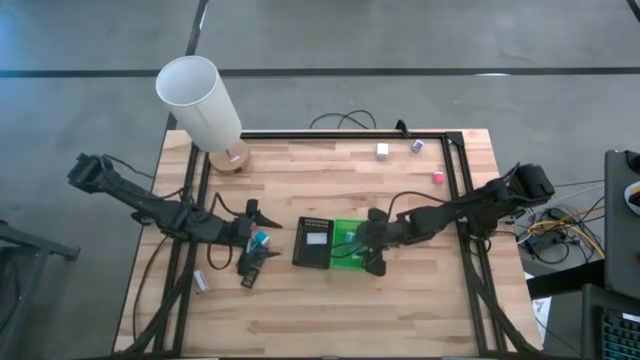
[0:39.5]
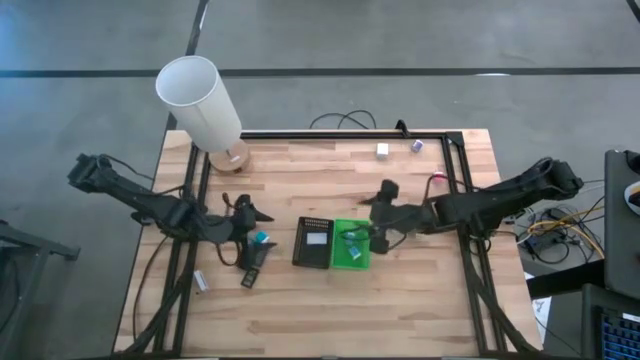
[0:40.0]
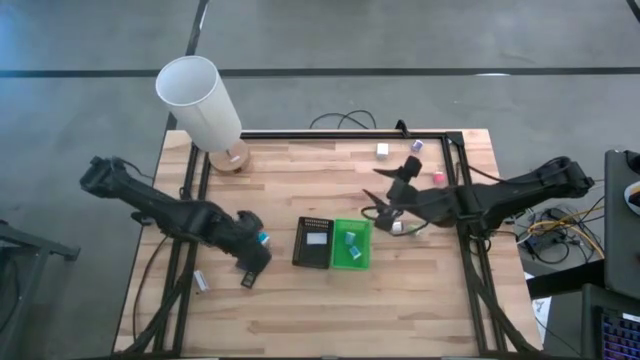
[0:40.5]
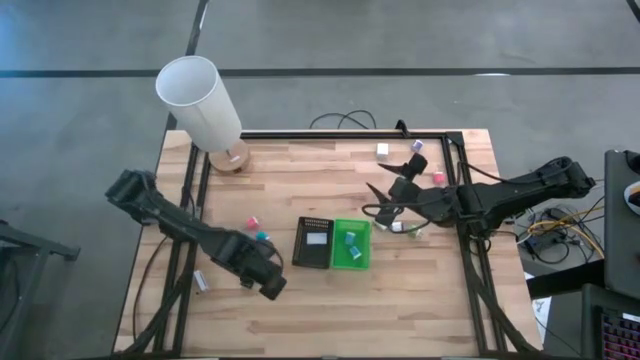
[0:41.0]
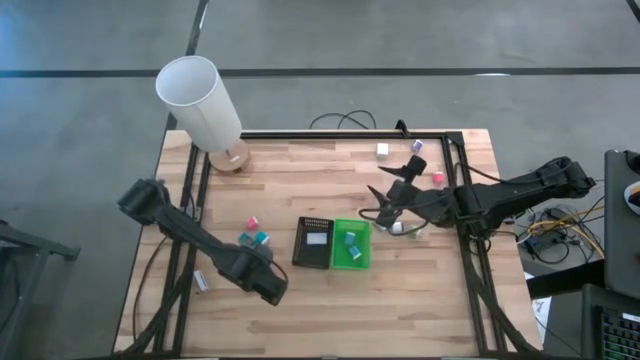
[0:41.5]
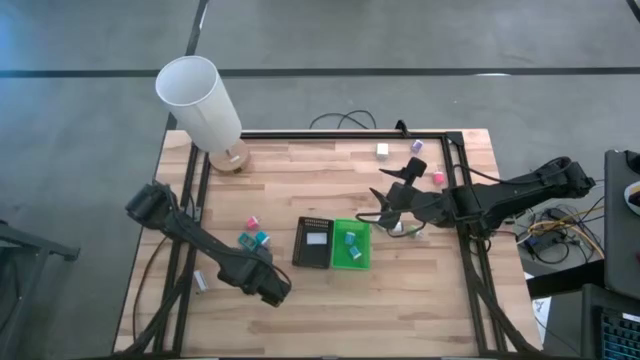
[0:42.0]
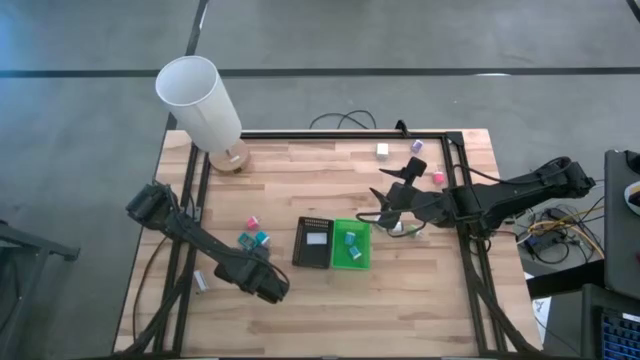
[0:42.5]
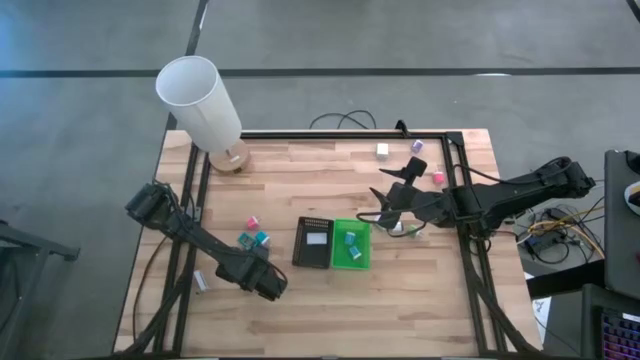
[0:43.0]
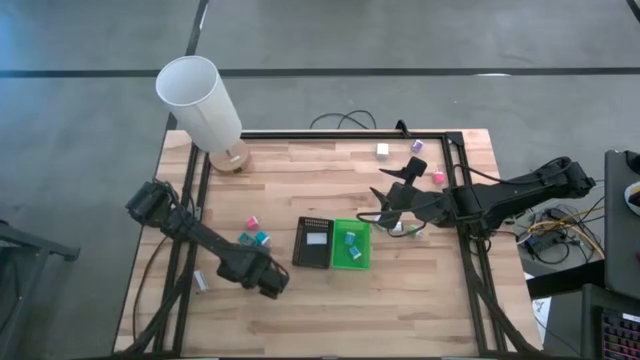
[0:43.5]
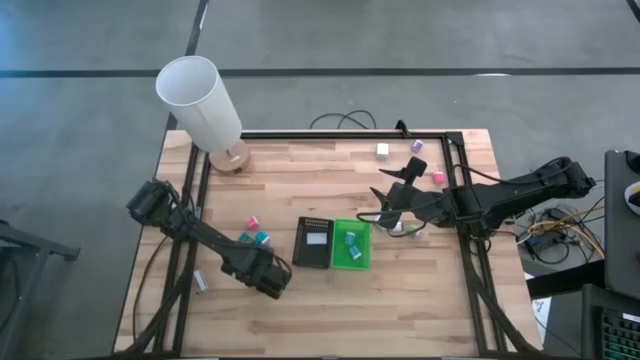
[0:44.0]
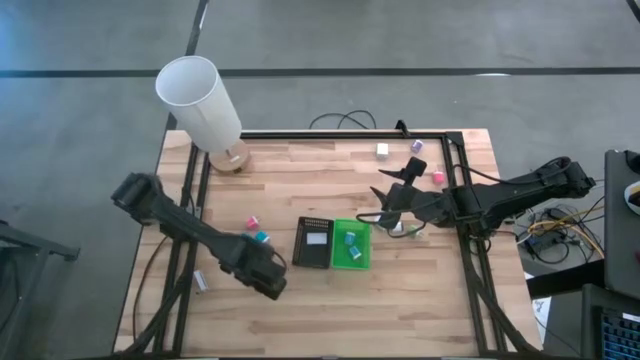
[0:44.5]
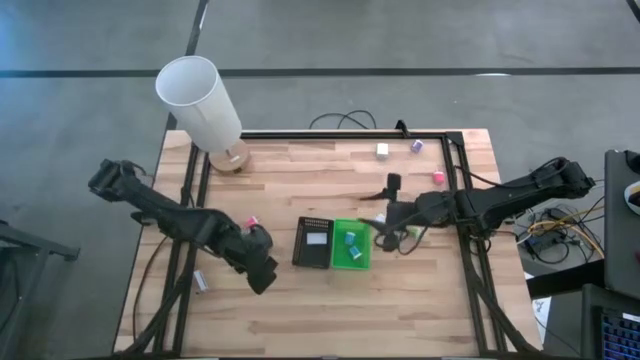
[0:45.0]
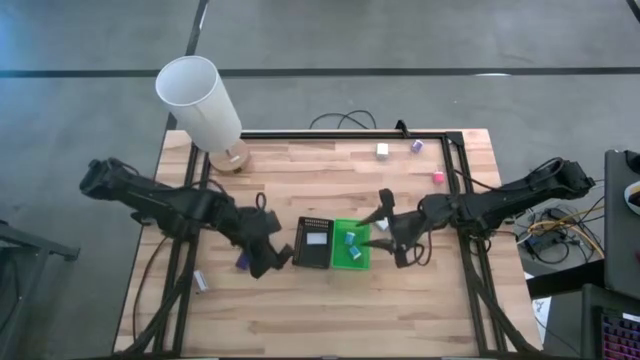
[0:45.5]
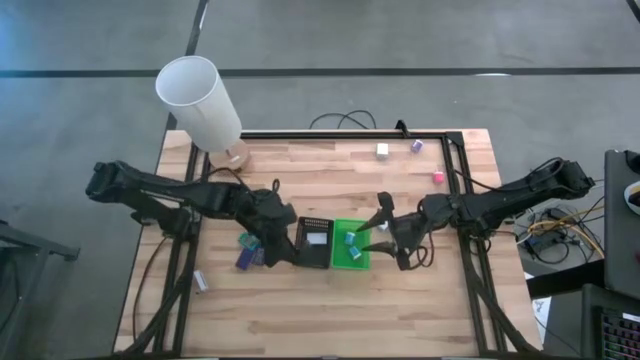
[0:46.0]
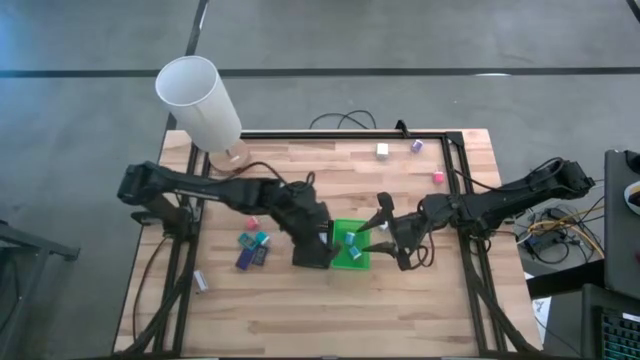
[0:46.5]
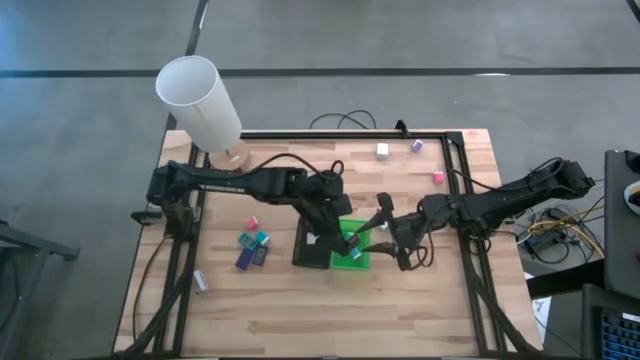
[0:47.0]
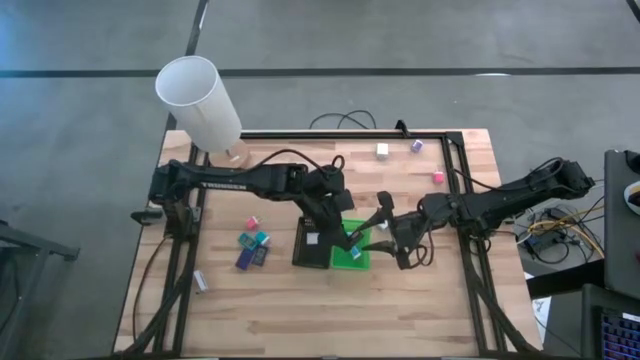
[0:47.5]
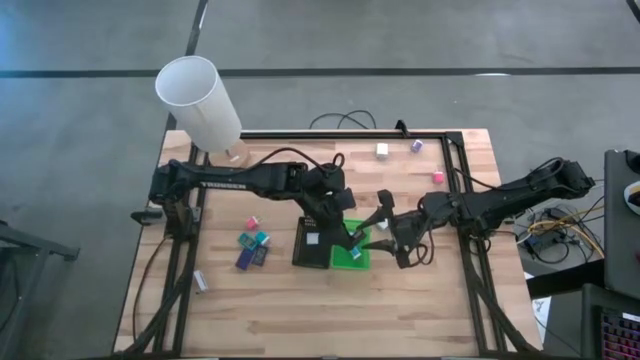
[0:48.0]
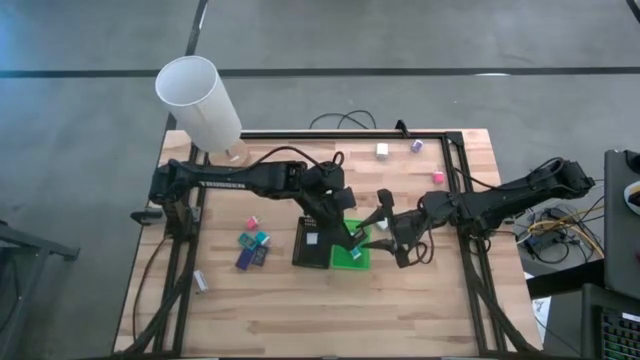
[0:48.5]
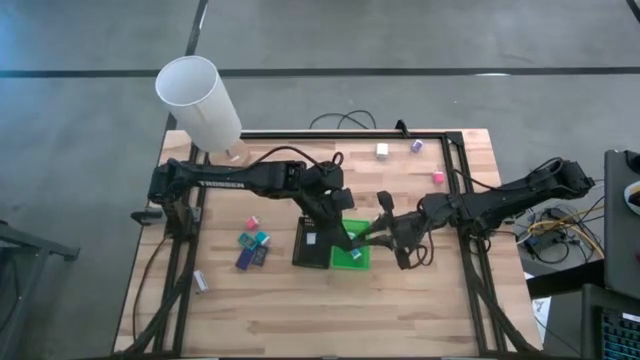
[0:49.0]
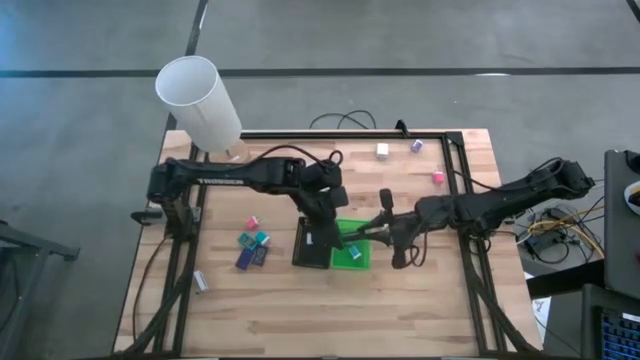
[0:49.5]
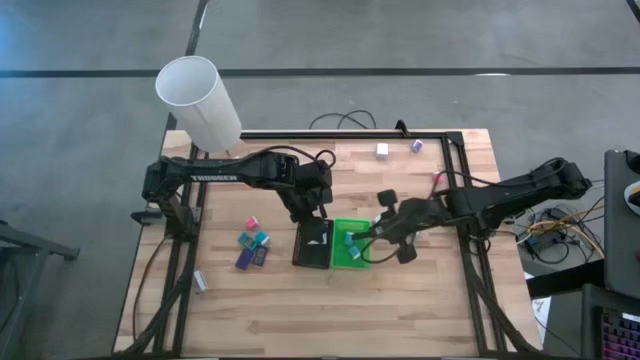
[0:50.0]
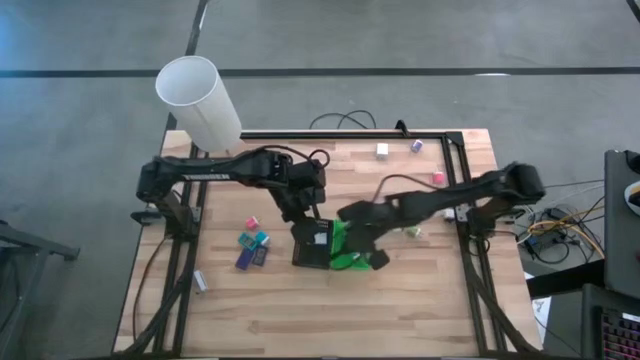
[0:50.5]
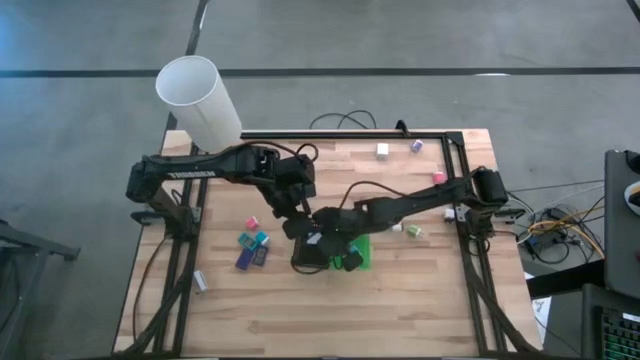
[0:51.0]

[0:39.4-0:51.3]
Task: Pick & Place Office items
Put the black digital clock into the black basket

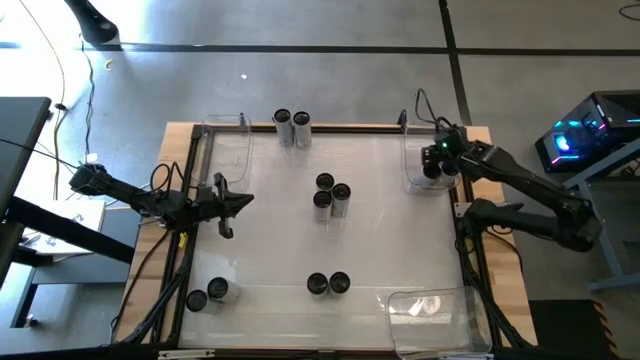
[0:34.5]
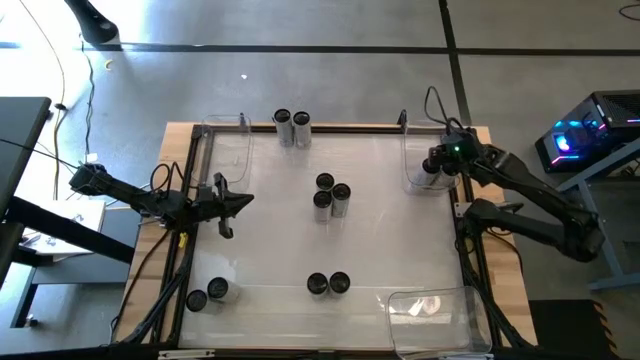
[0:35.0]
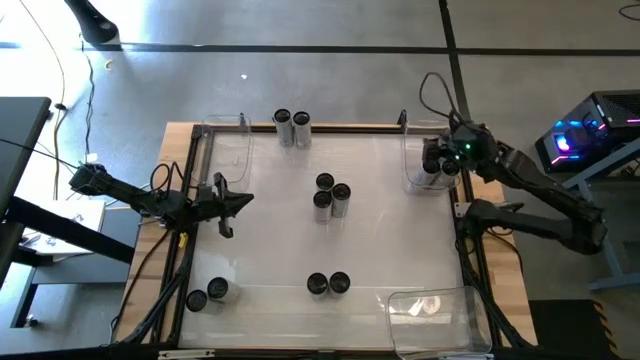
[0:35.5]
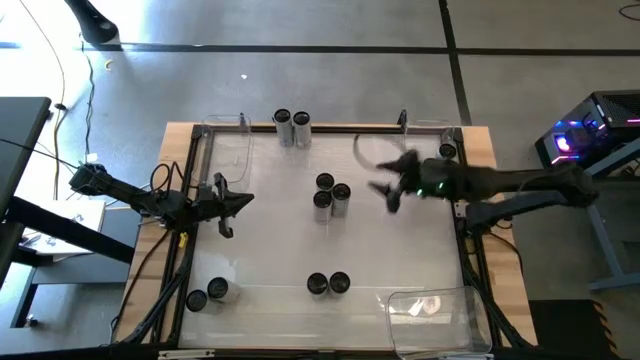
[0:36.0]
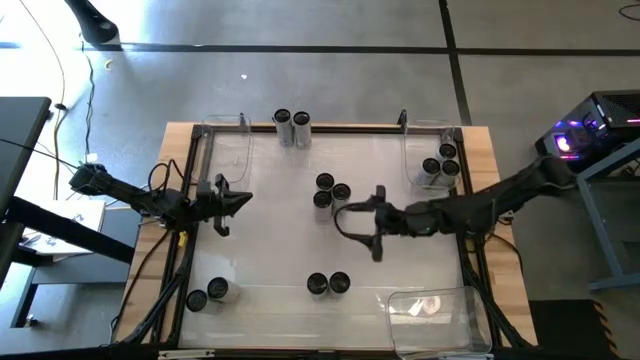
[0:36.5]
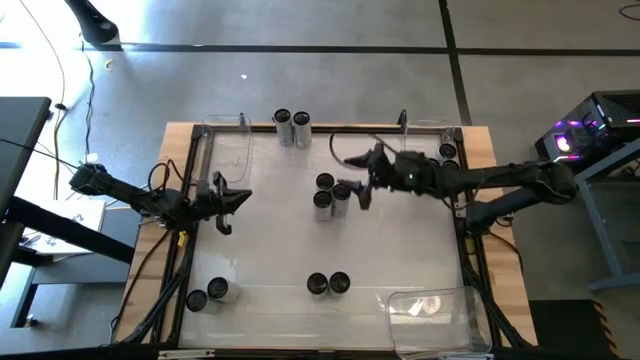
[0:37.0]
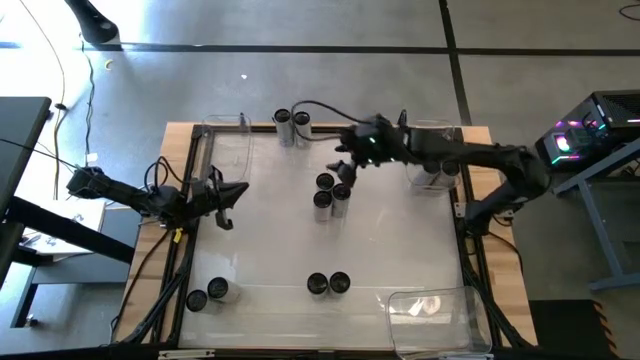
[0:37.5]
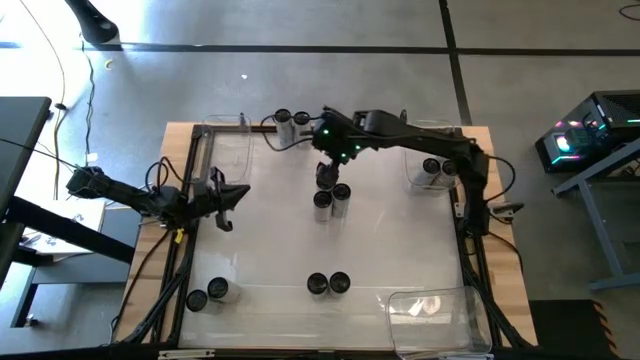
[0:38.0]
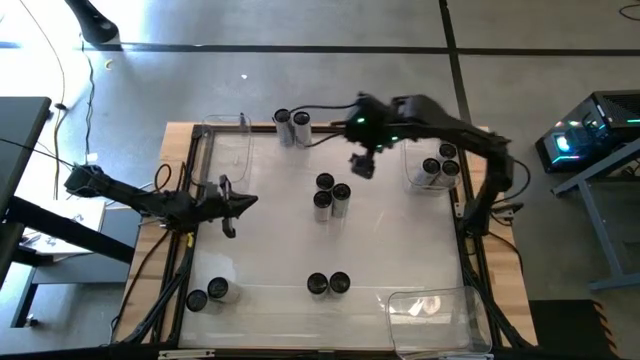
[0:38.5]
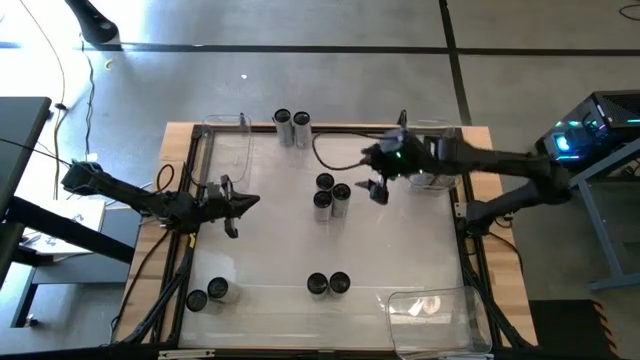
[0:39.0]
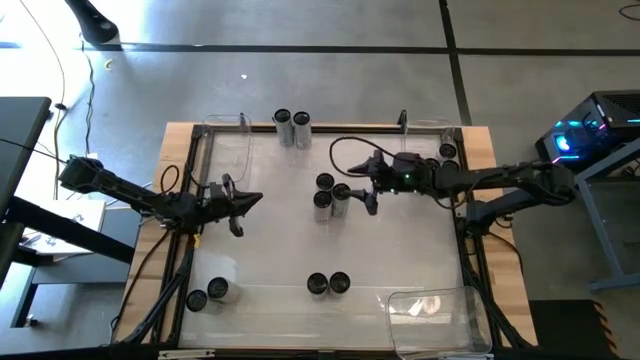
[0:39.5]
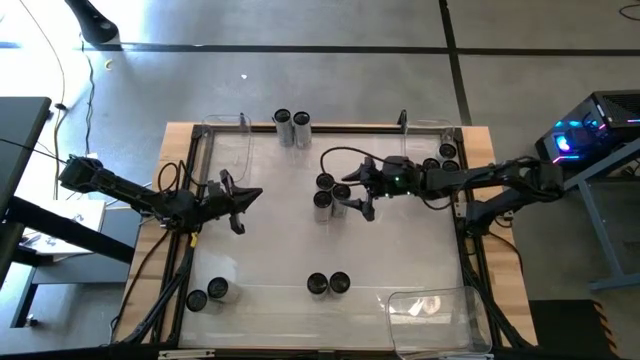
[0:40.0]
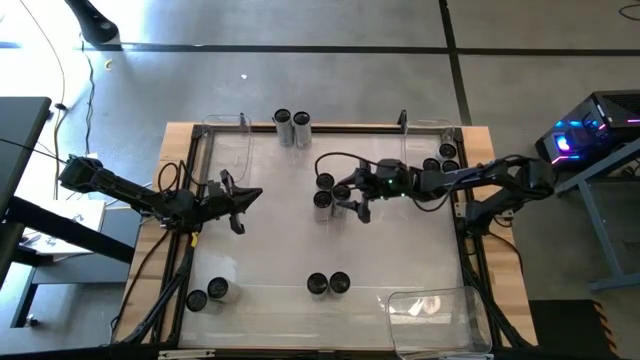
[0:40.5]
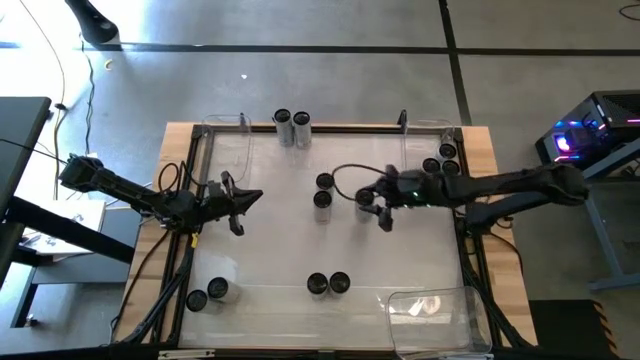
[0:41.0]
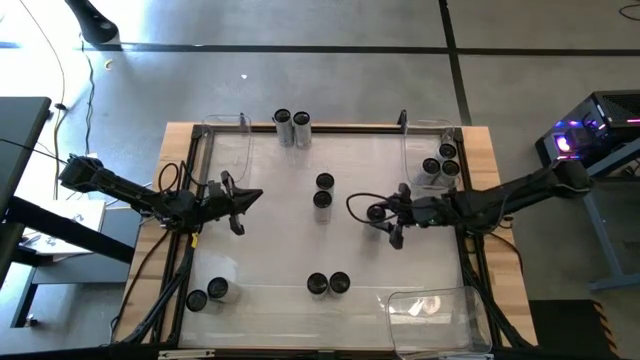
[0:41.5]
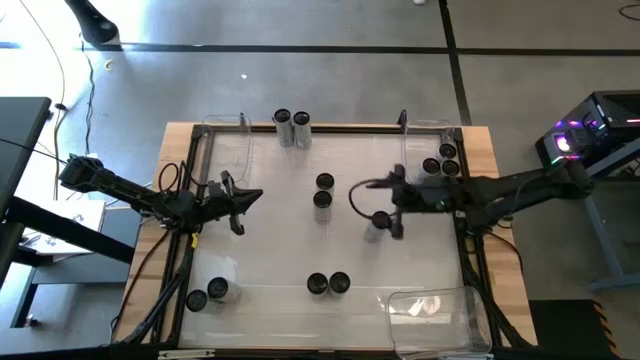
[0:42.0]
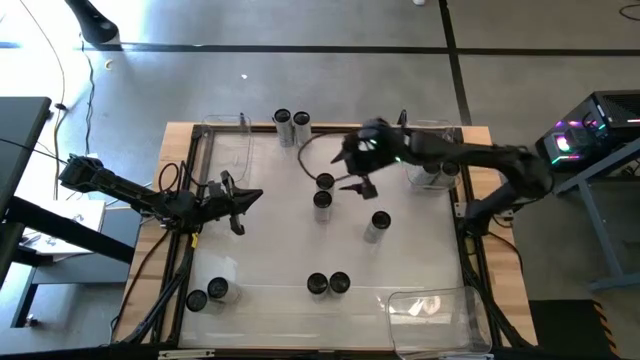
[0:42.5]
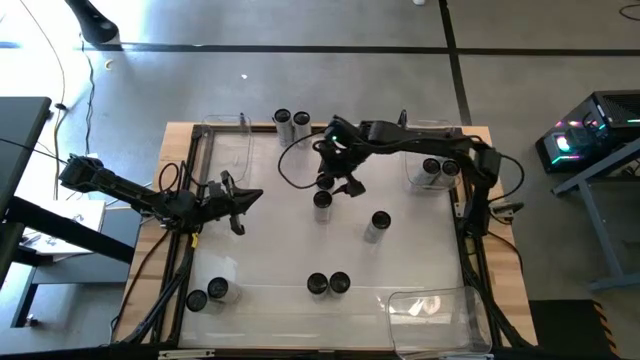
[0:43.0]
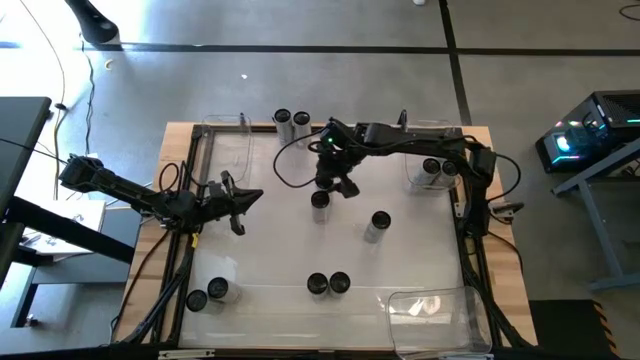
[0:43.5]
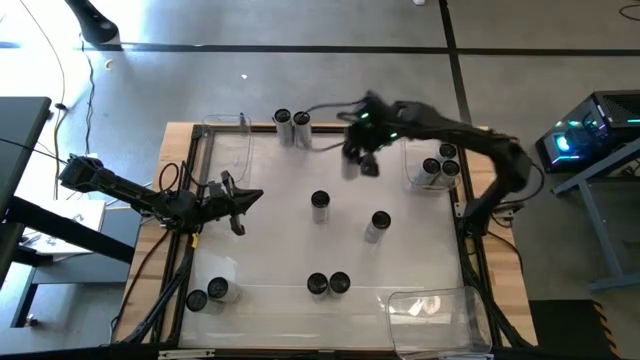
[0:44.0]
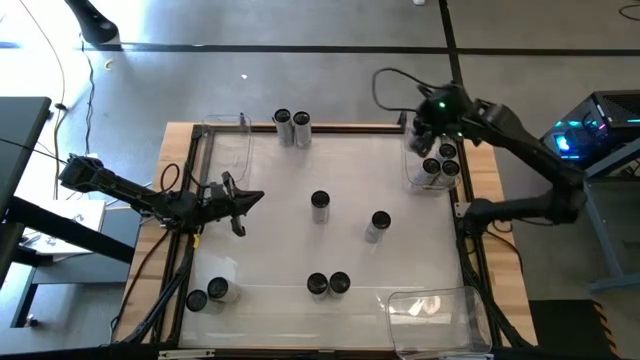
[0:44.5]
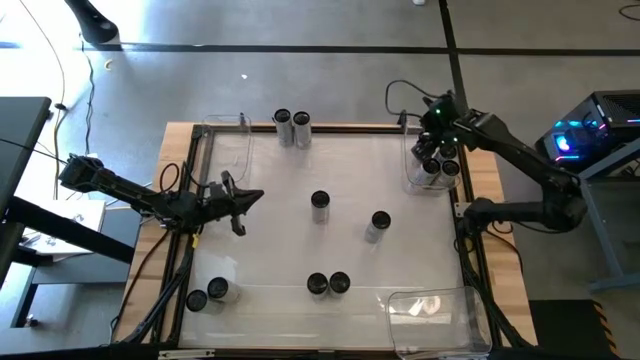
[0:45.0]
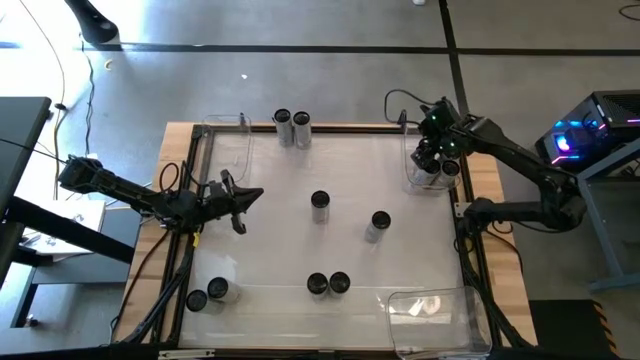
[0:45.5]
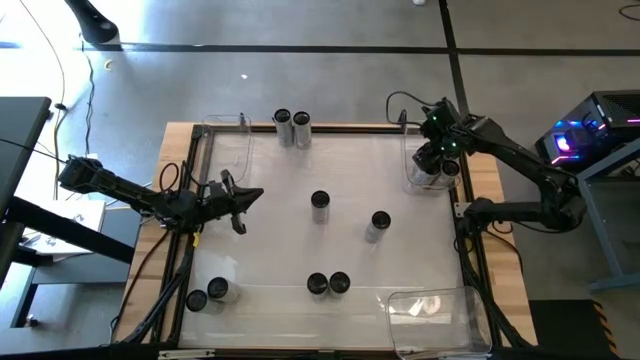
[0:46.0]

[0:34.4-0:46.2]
Task: Sort soda cans
Put the yellow soda can into the top right transparent bin
